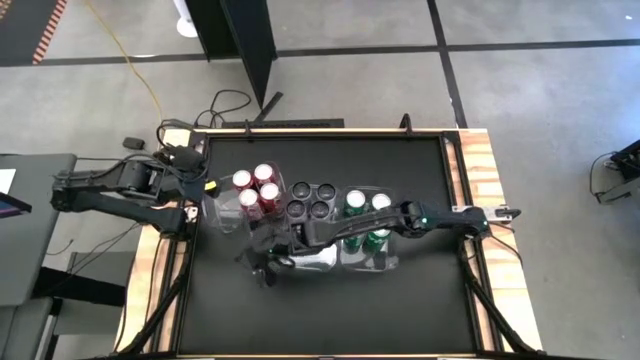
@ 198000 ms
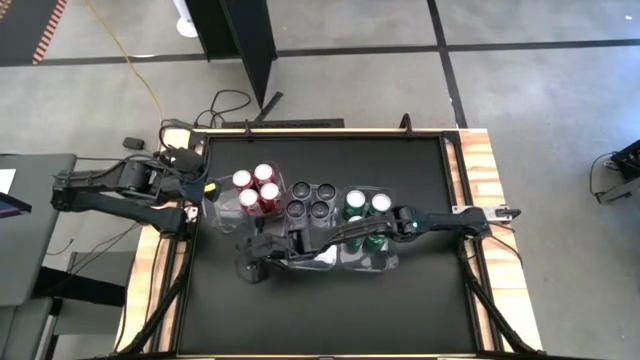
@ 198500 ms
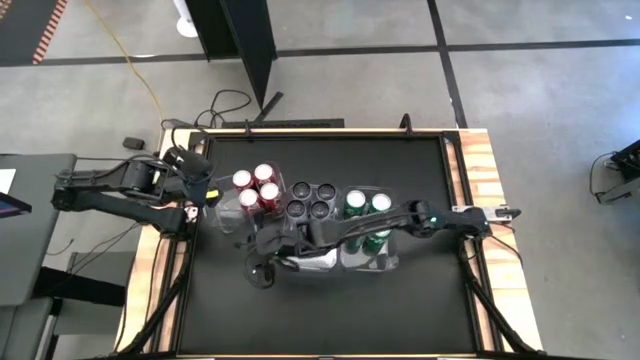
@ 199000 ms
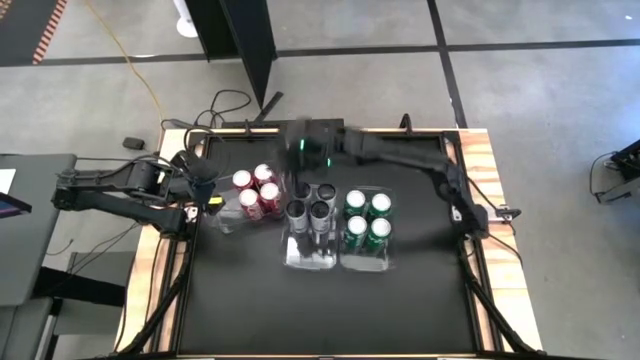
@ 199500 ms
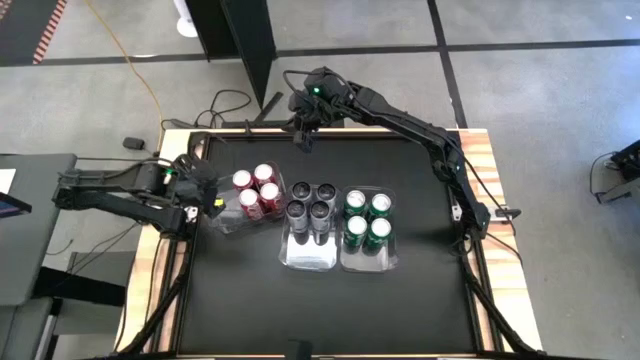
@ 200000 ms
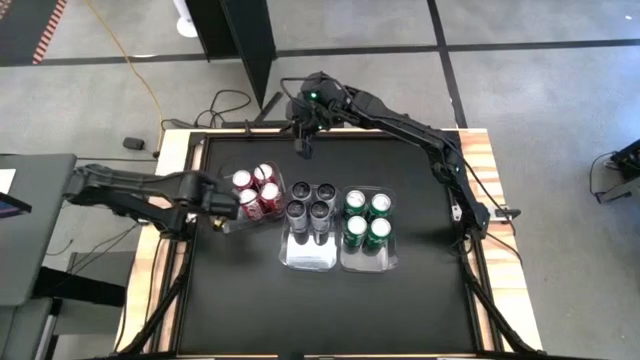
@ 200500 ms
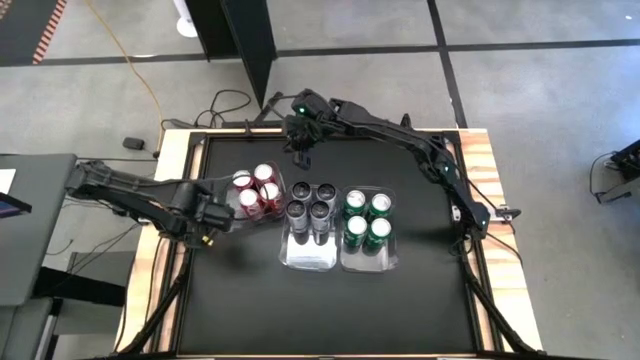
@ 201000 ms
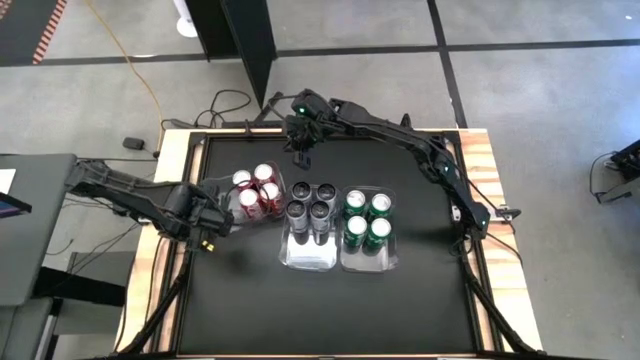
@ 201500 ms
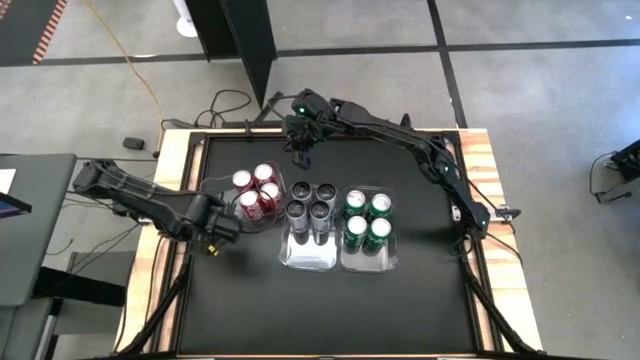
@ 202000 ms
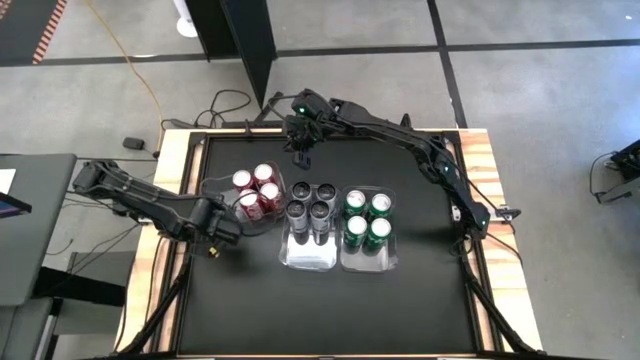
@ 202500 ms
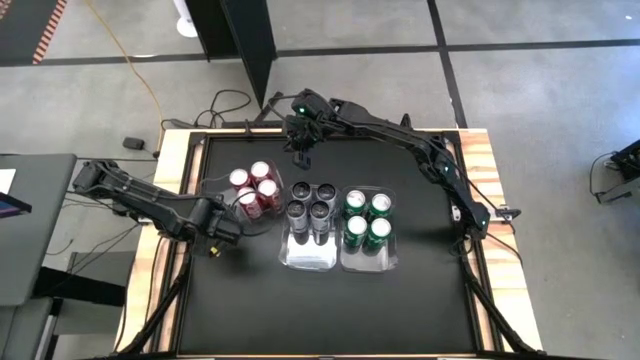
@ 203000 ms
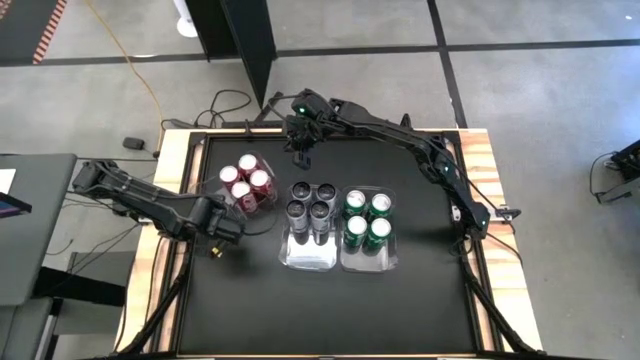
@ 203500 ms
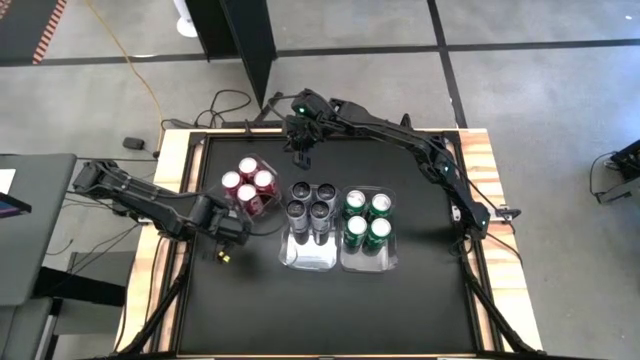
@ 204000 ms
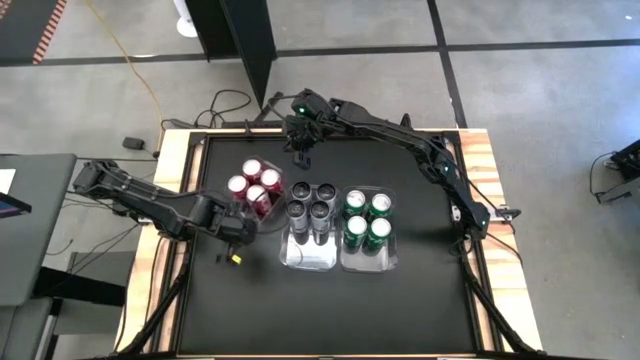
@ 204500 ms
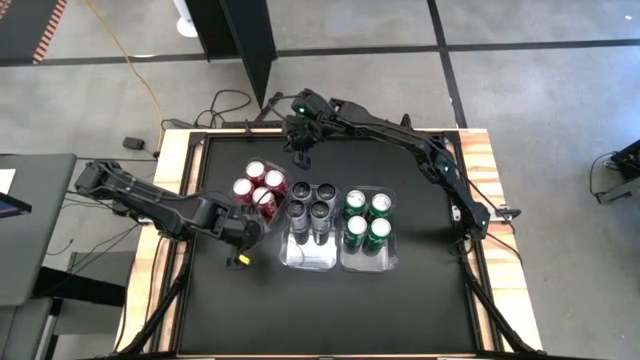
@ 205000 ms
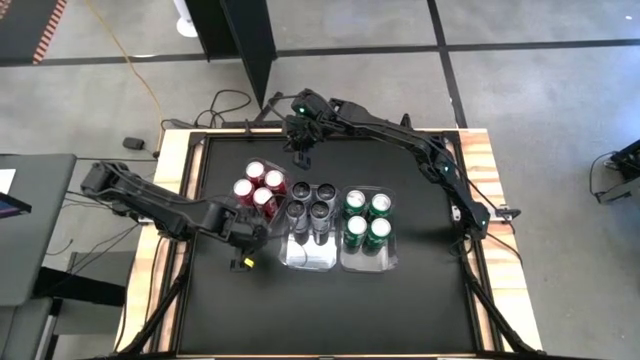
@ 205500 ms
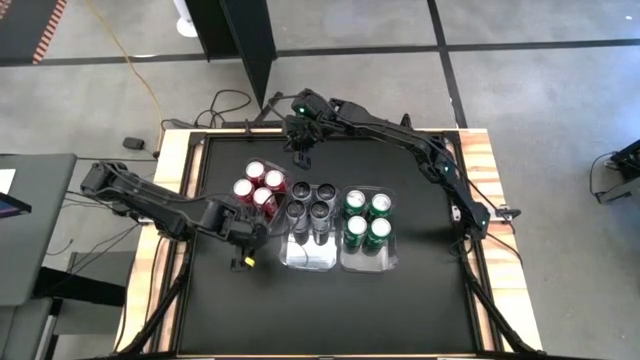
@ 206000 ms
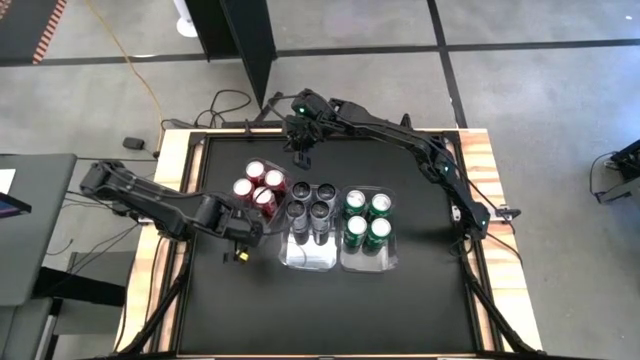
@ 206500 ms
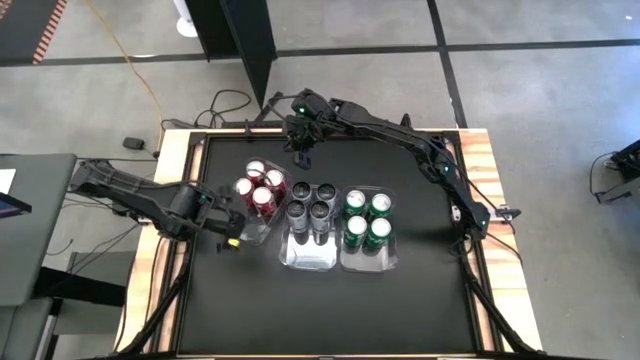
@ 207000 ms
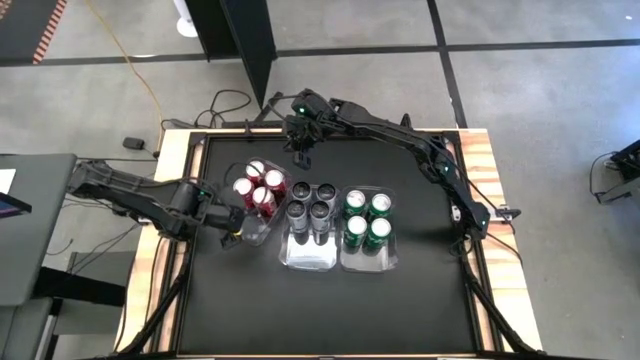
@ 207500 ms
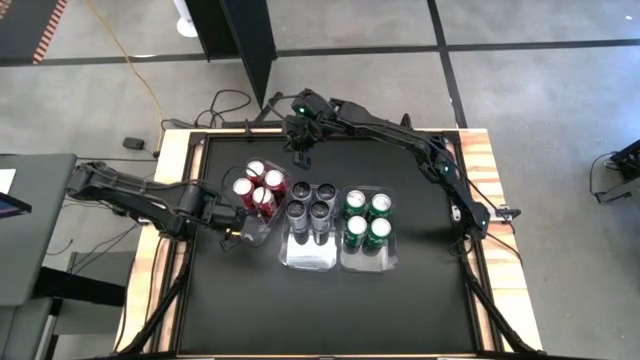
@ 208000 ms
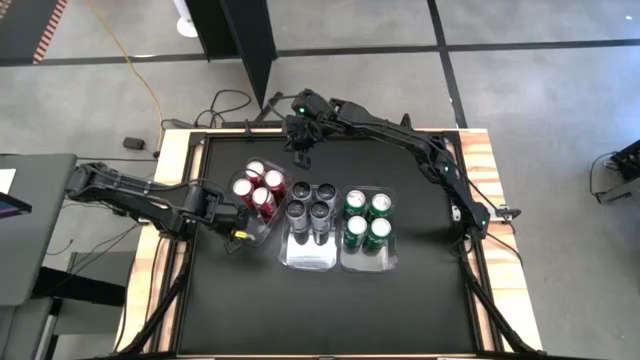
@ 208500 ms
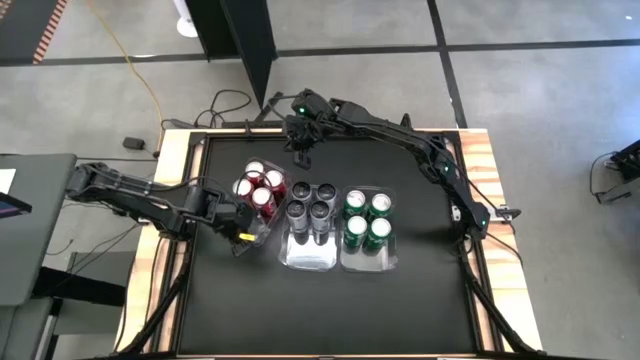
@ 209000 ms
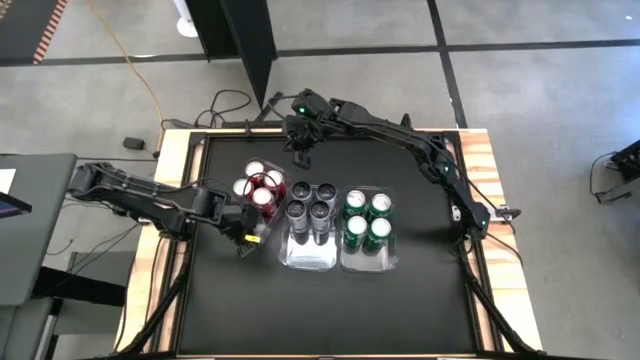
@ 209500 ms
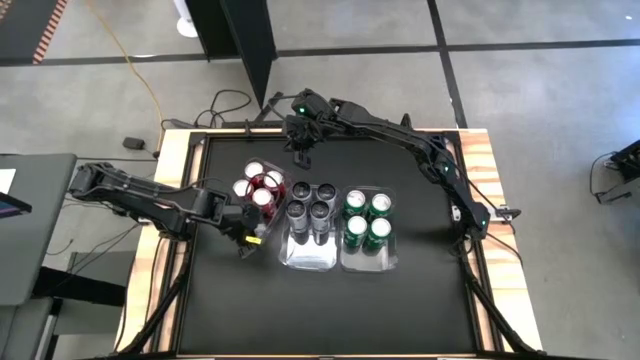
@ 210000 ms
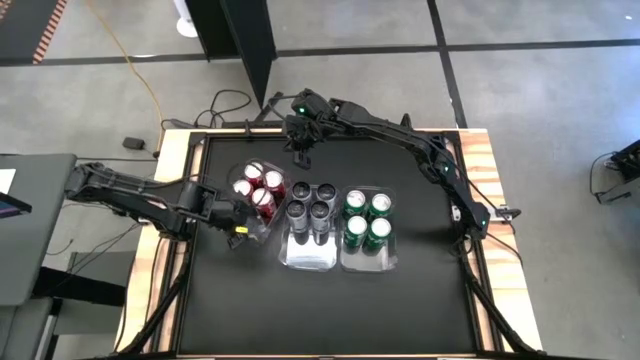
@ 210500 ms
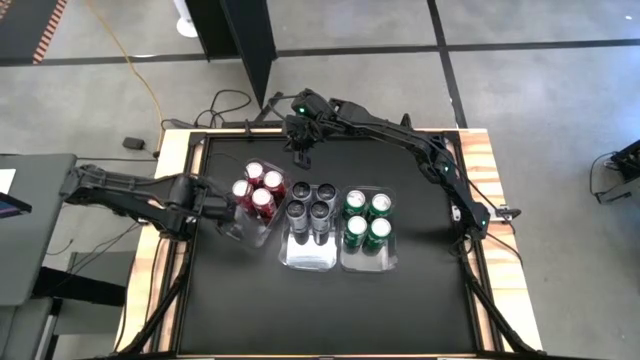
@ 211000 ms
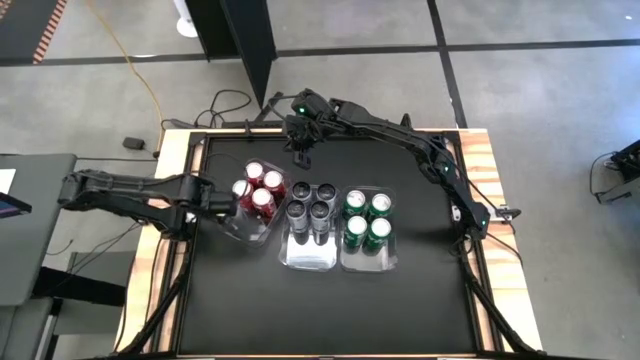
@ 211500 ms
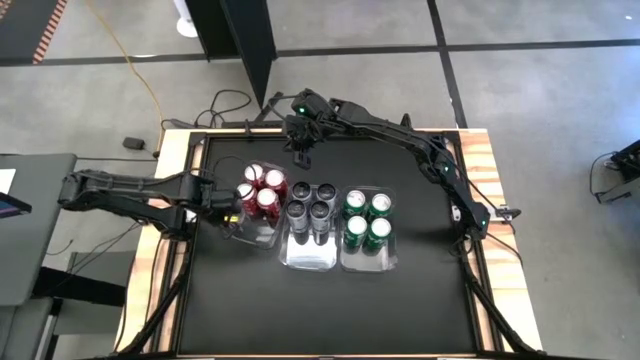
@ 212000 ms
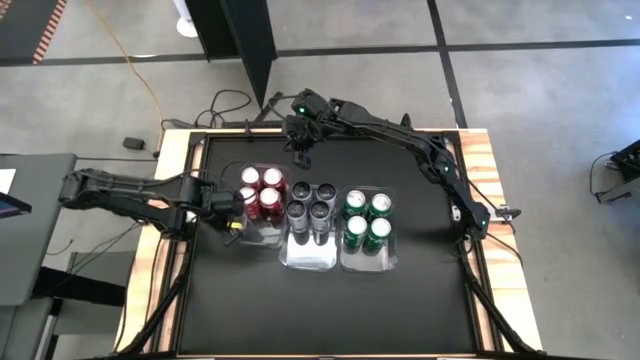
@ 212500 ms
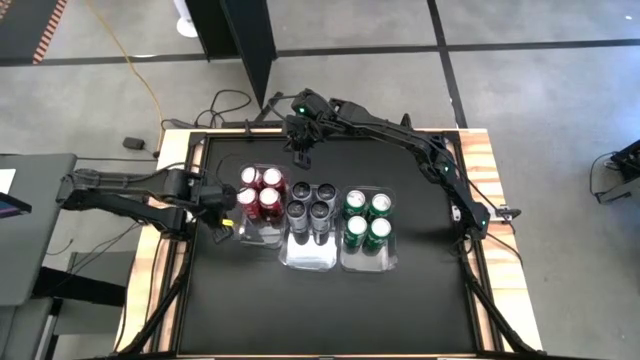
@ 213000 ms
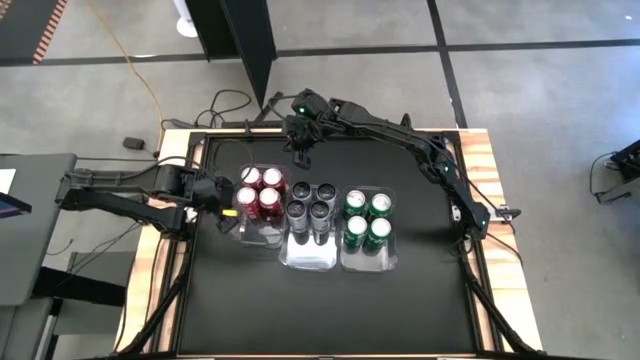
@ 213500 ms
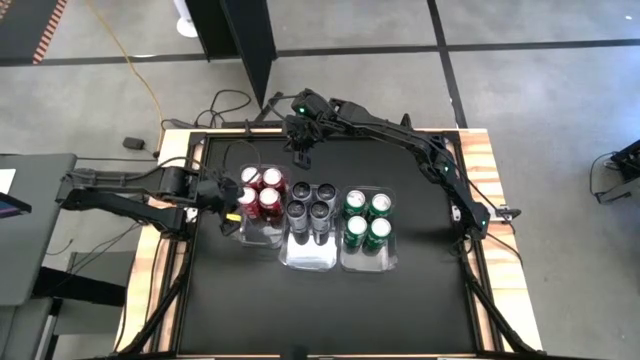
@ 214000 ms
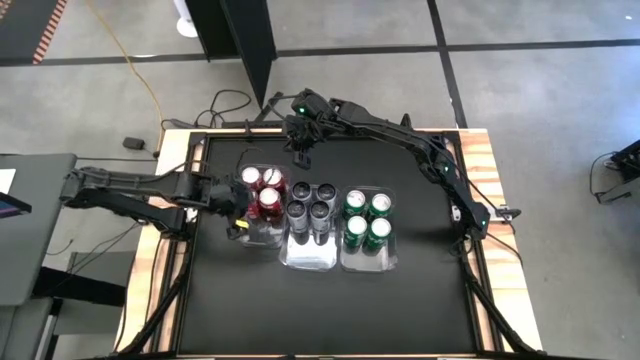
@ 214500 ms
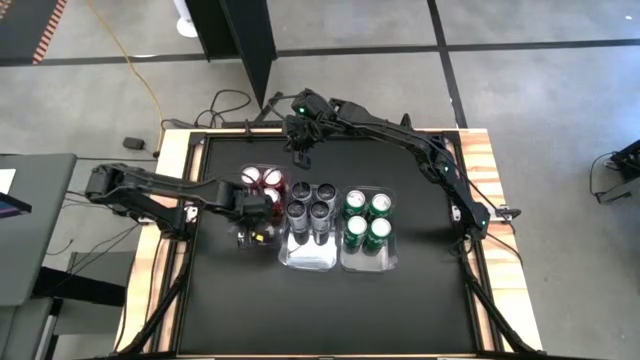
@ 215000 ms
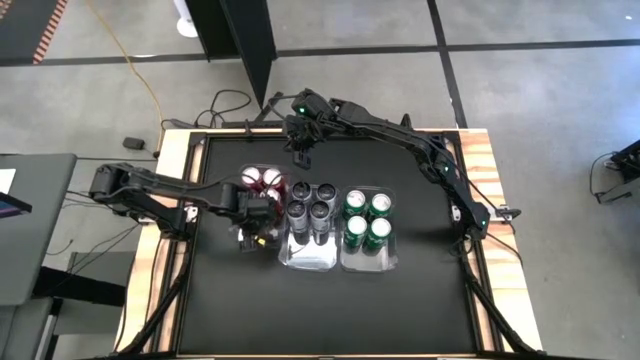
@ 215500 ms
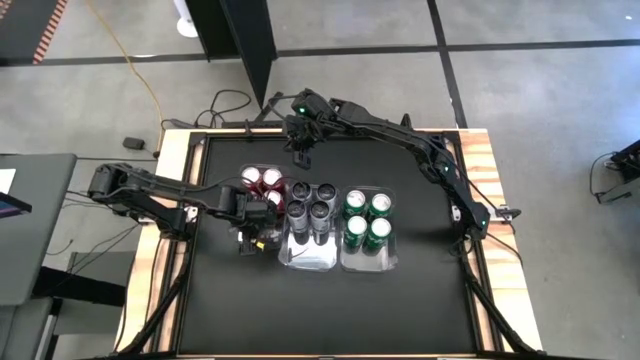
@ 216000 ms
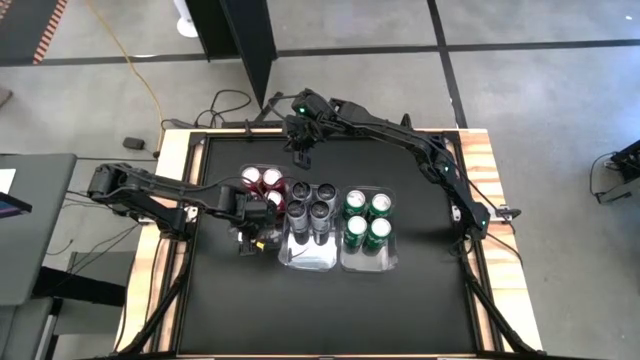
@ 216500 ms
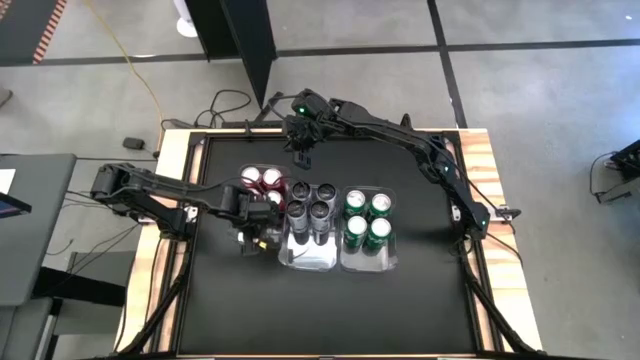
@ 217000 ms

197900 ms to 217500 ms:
Task: Sort soda cans
Adjust the left transparent bin

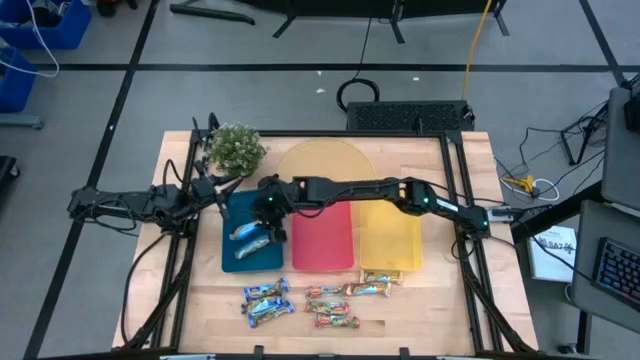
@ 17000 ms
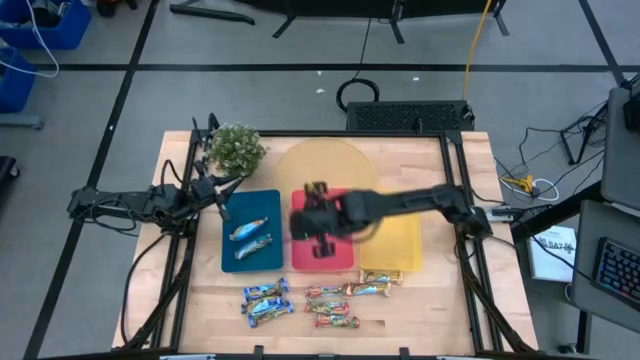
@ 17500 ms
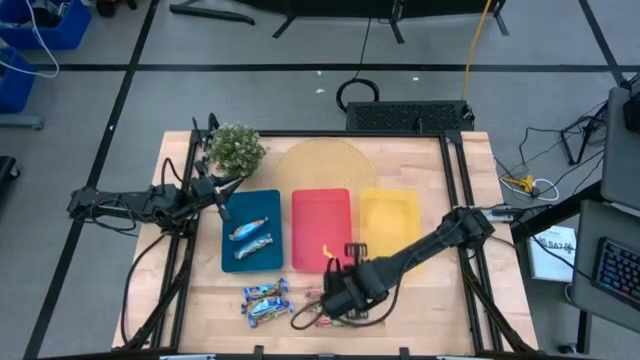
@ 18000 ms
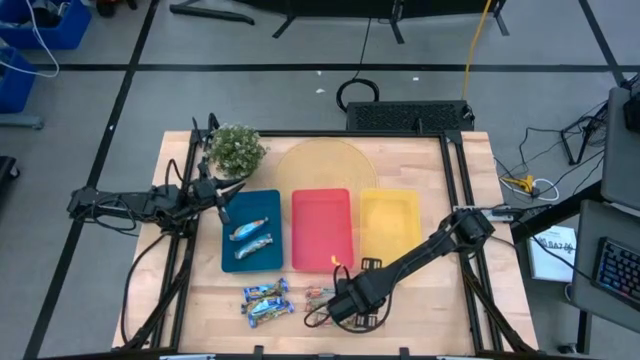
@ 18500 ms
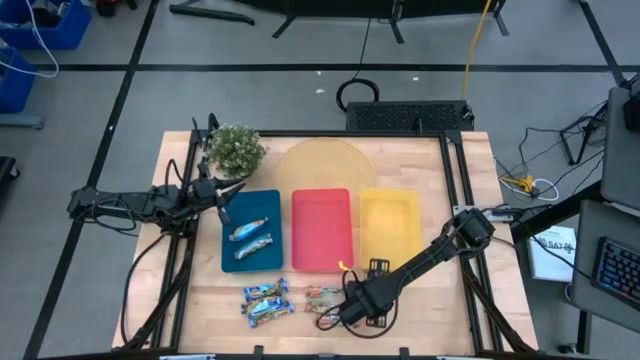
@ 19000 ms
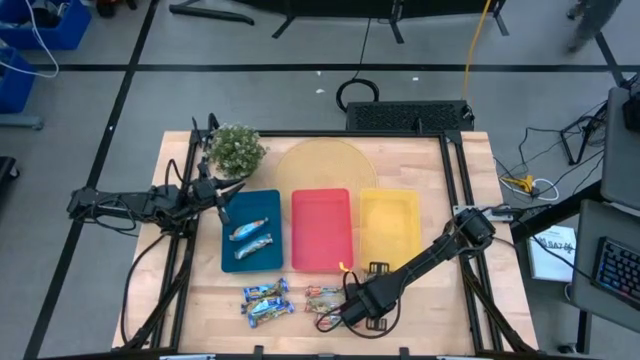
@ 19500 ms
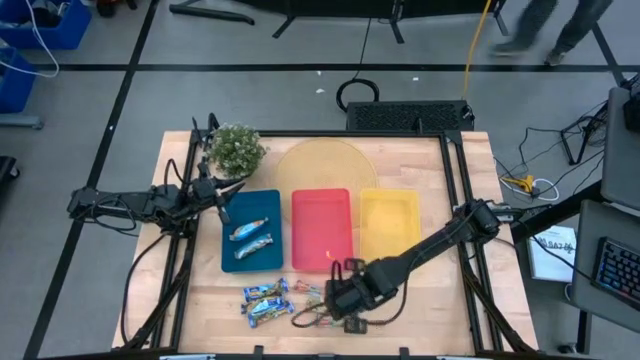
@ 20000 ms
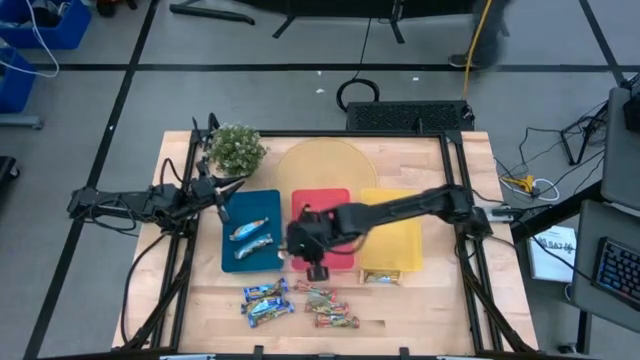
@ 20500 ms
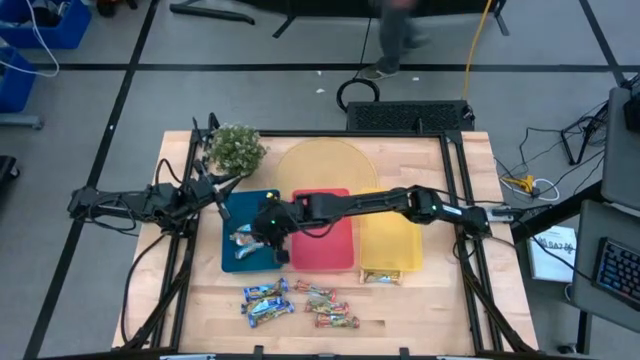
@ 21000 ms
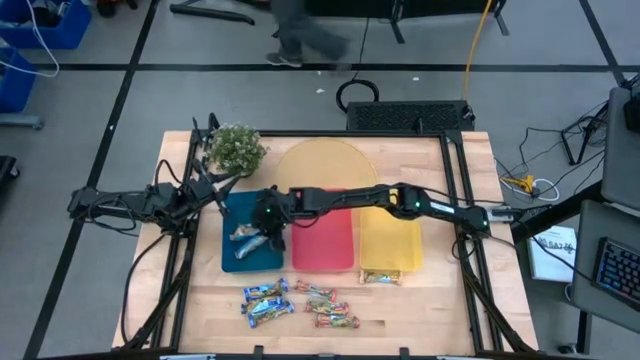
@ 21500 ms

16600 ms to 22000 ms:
Task: Pick and place Granola Bars by type
Put the yellow granola bar into the blue bin
